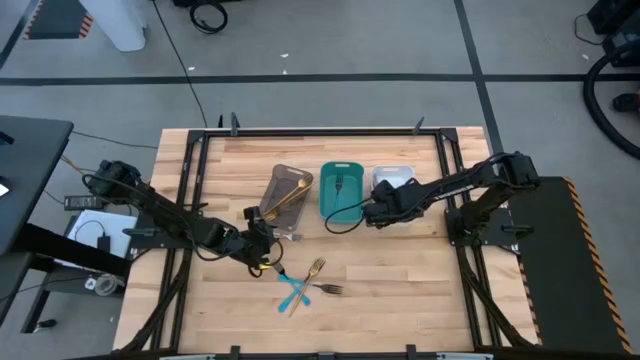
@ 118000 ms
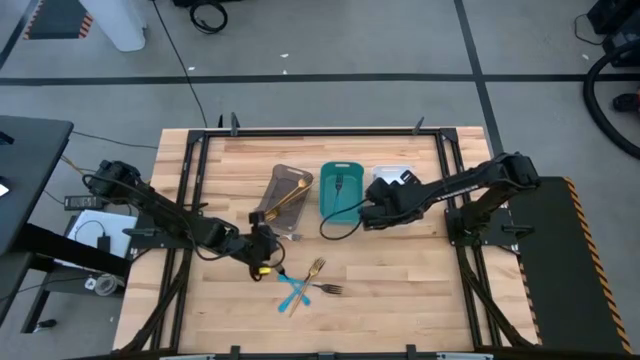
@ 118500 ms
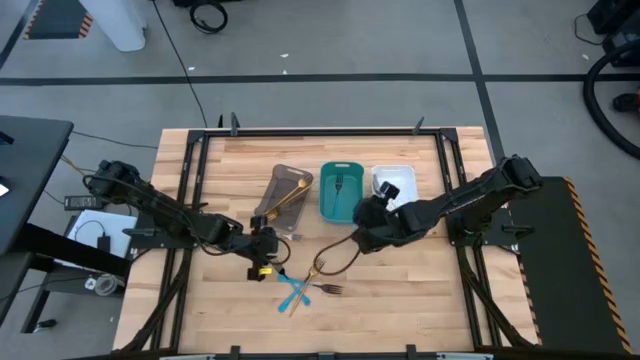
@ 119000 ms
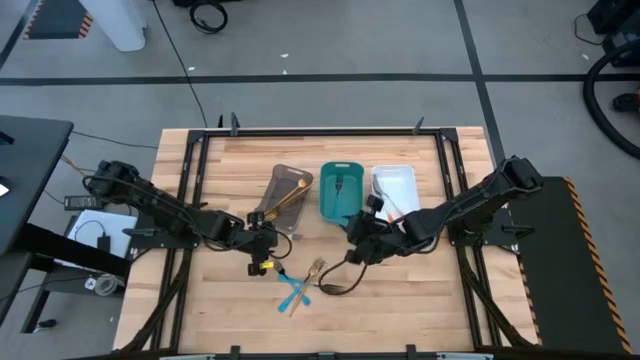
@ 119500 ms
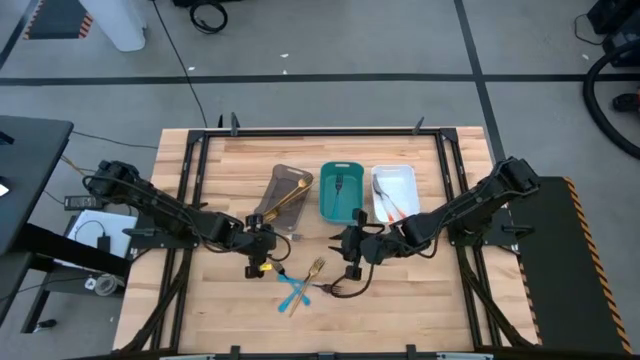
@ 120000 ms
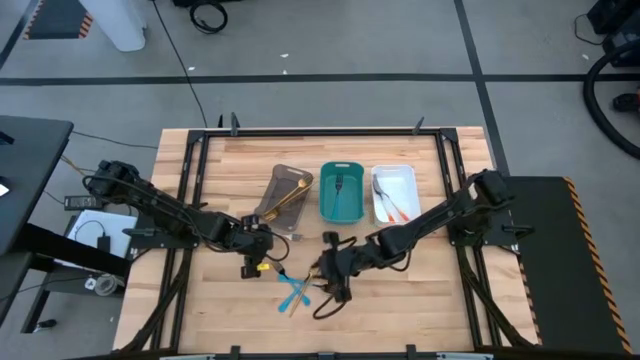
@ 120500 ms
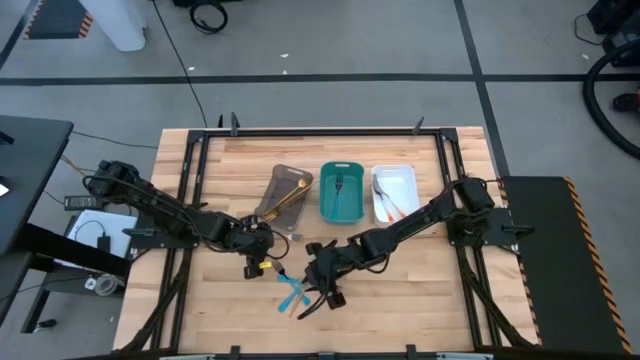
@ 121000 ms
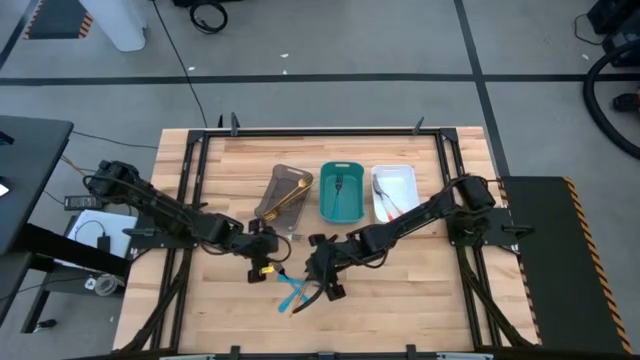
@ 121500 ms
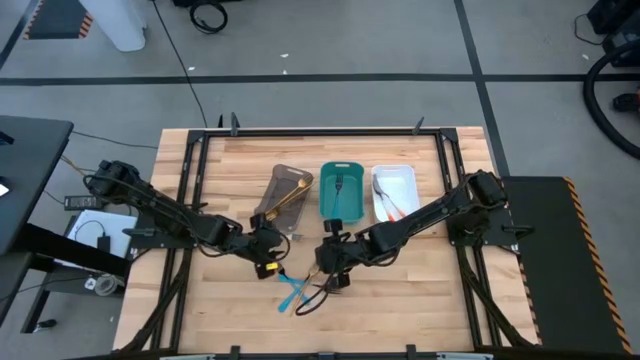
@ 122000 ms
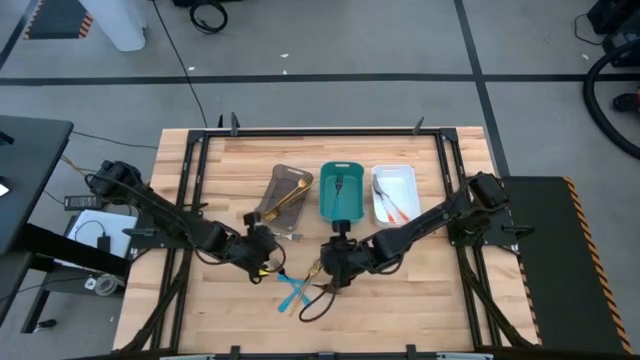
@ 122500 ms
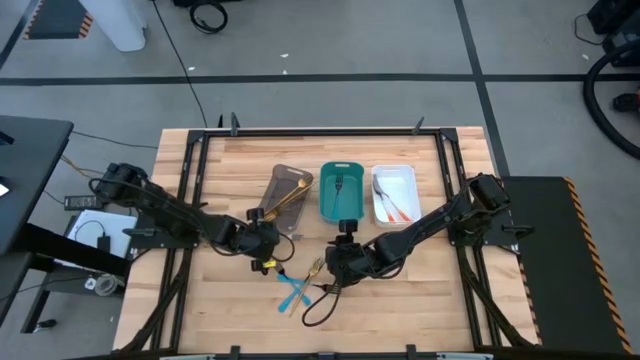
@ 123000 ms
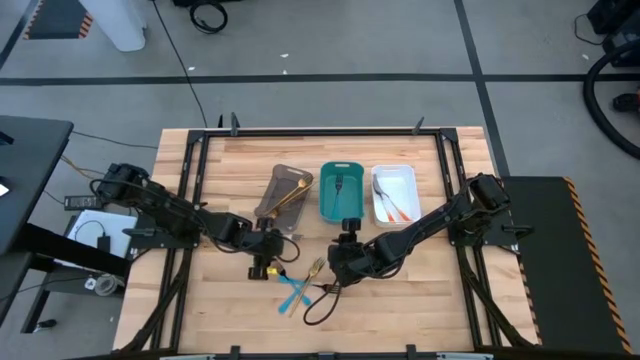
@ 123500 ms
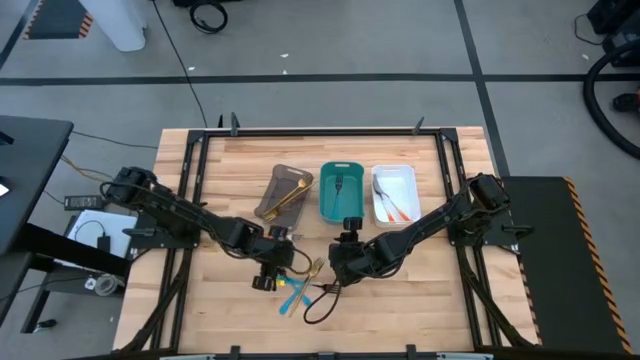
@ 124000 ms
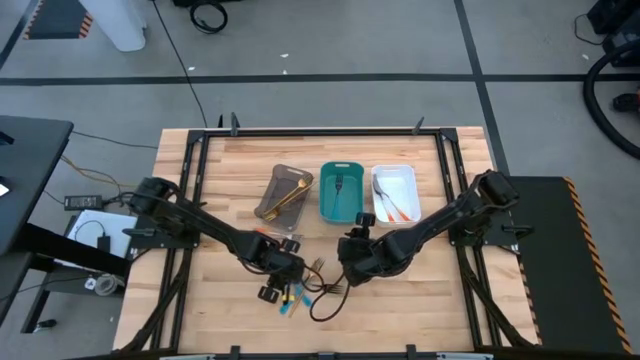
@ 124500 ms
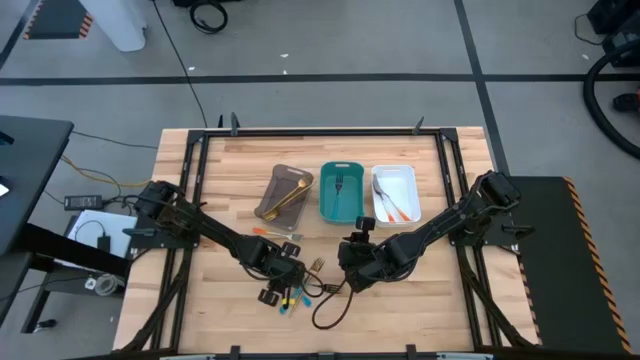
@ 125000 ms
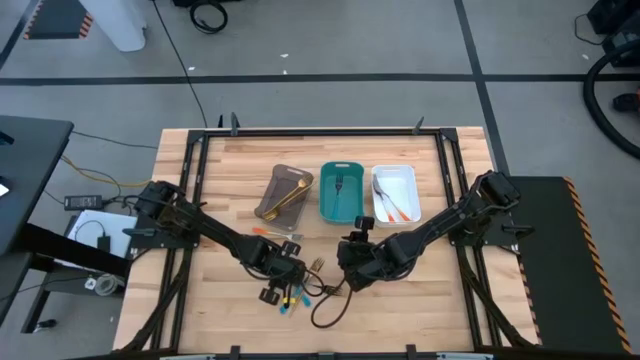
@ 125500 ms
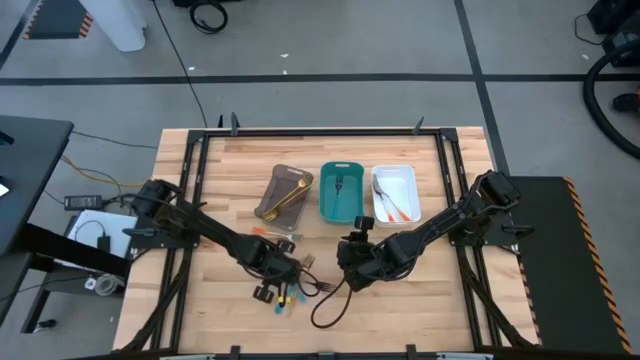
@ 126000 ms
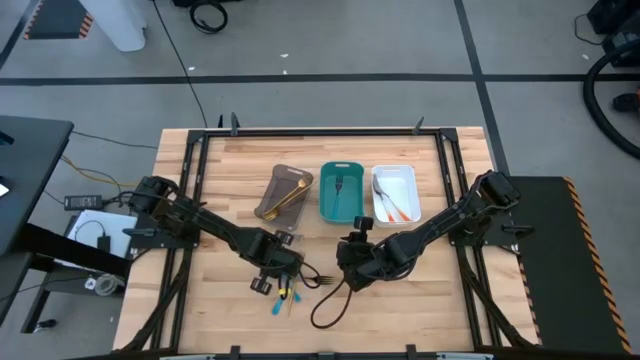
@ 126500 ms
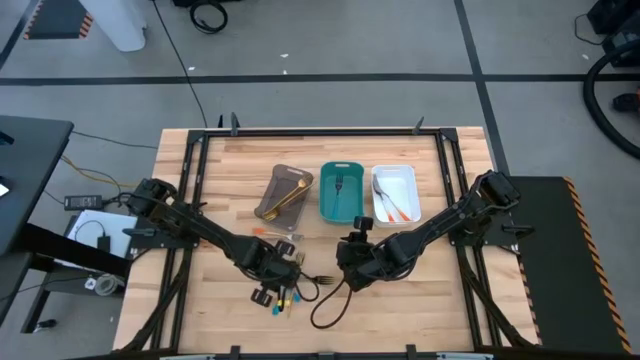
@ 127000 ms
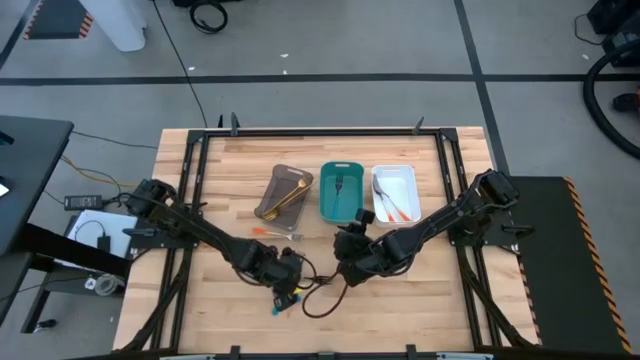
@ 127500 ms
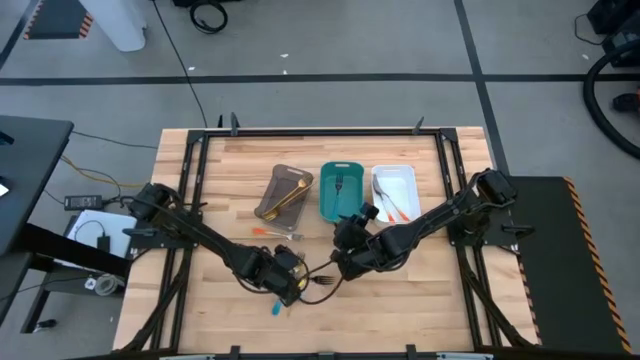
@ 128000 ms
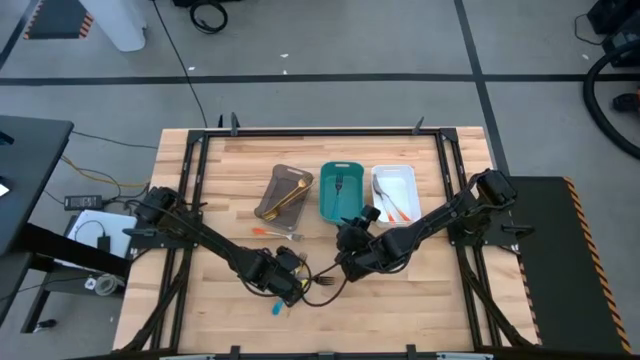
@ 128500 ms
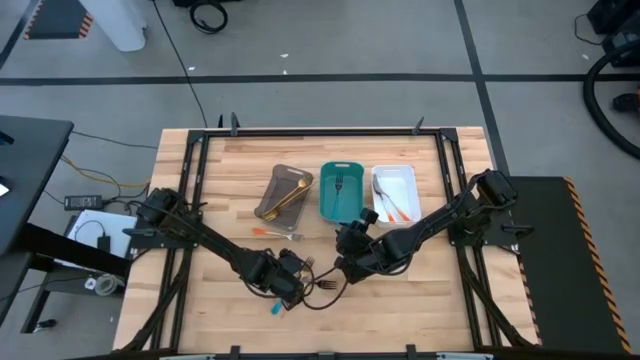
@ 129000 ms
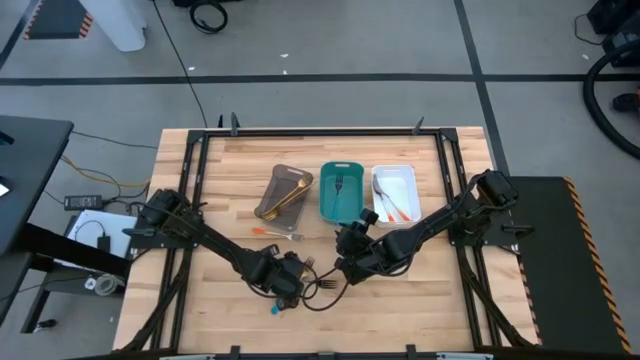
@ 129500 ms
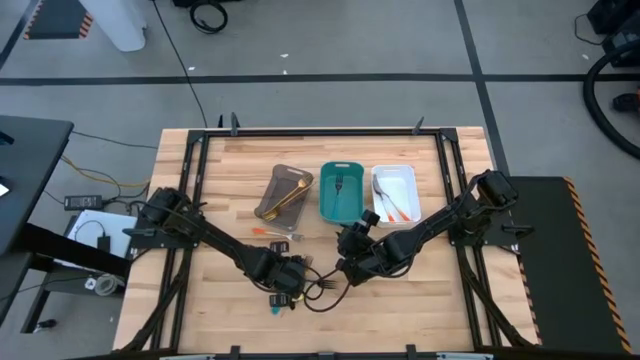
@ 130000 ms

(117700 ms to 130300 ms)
Task: Sort silverware by color (type)
Put the blue fork into the green bin

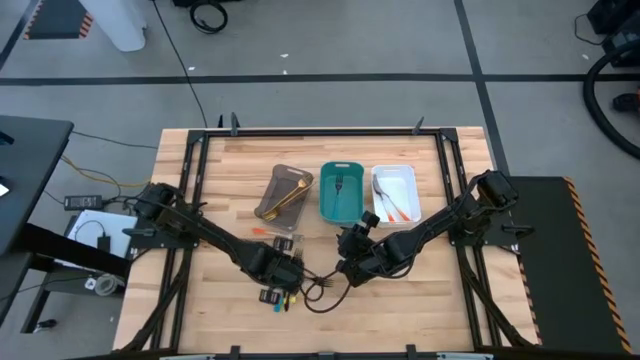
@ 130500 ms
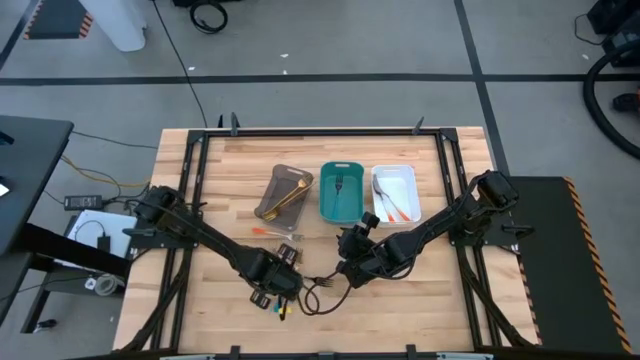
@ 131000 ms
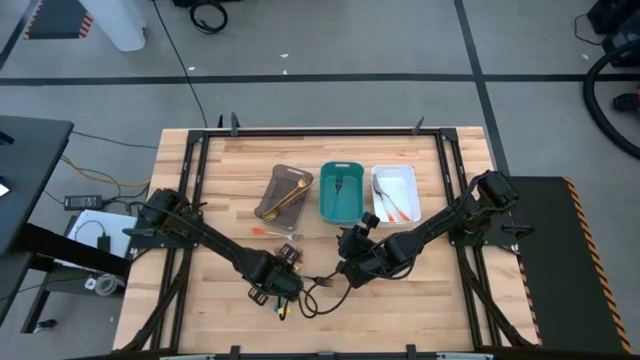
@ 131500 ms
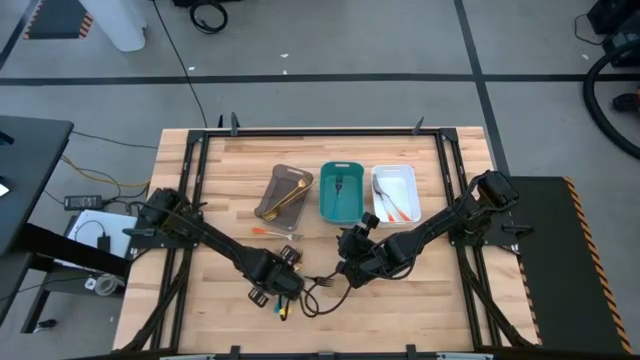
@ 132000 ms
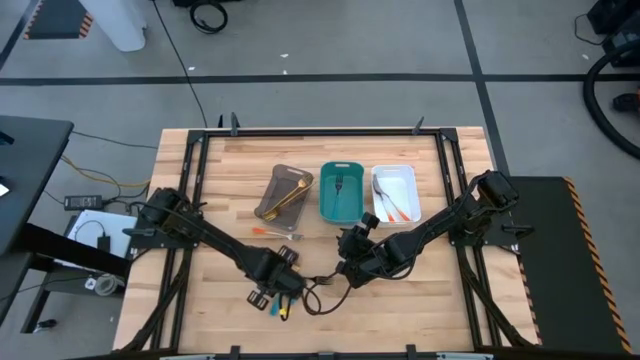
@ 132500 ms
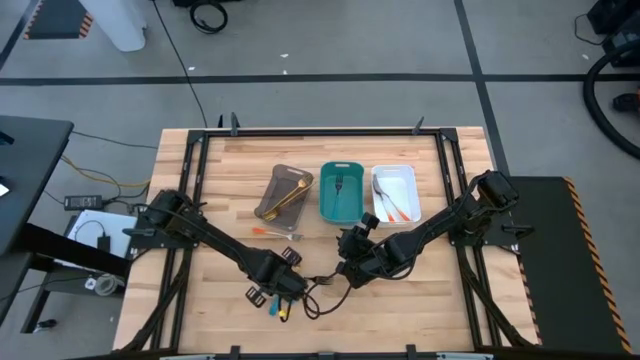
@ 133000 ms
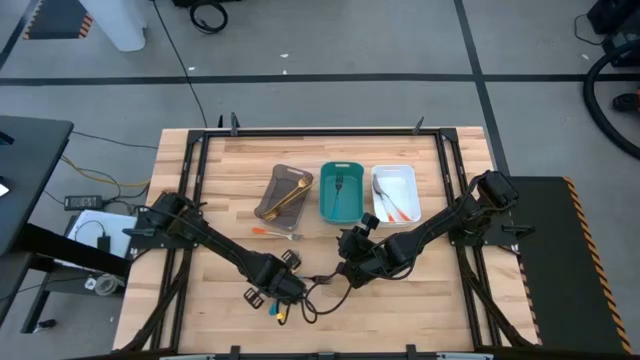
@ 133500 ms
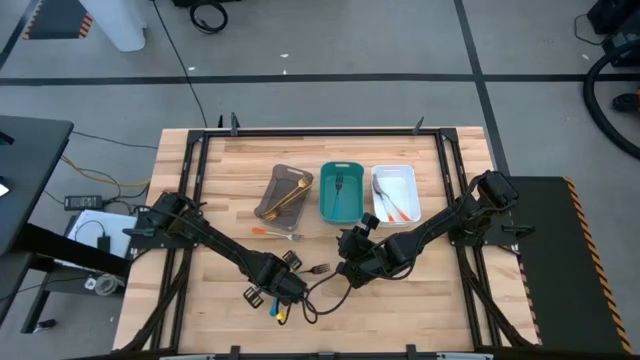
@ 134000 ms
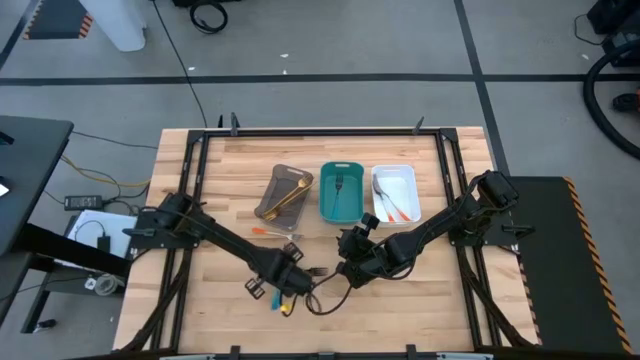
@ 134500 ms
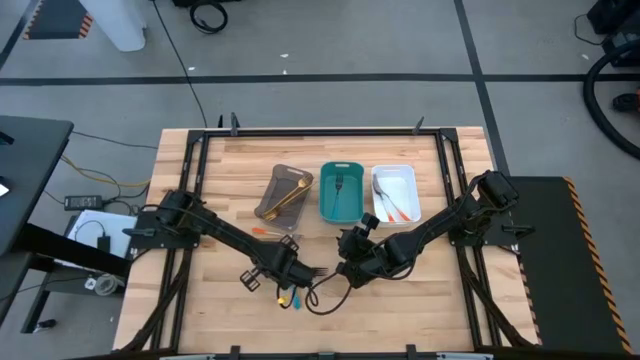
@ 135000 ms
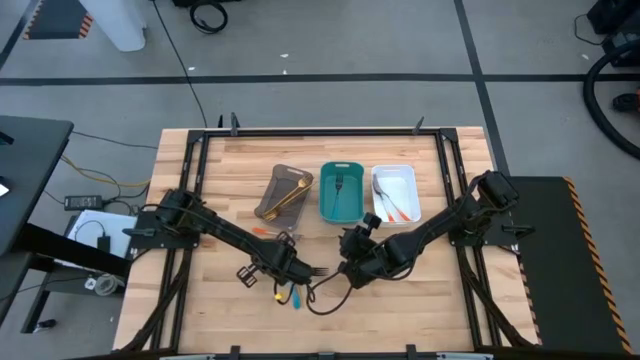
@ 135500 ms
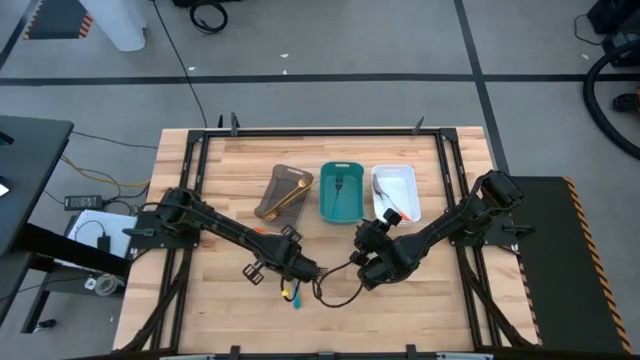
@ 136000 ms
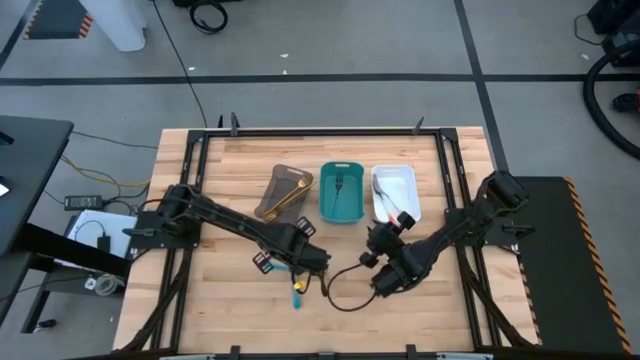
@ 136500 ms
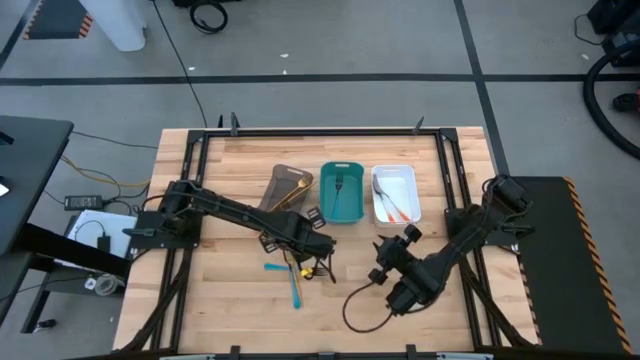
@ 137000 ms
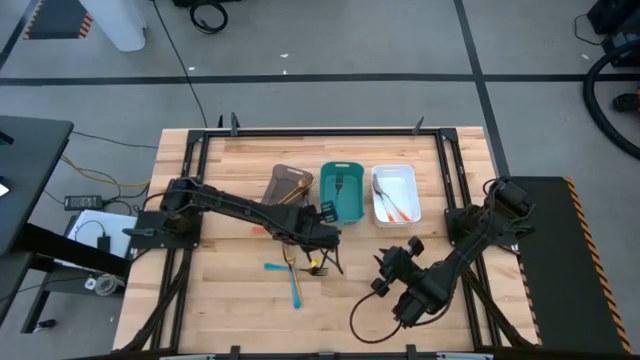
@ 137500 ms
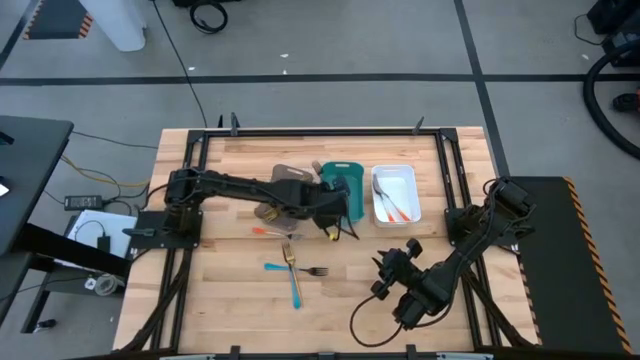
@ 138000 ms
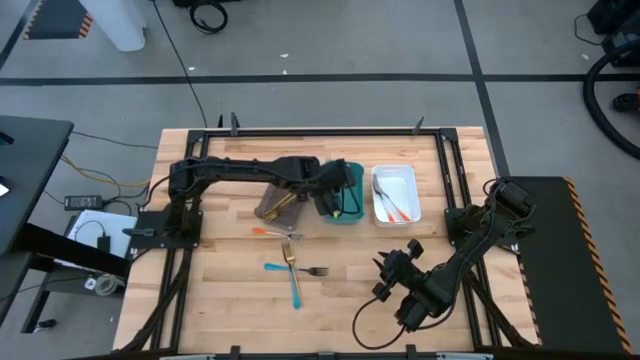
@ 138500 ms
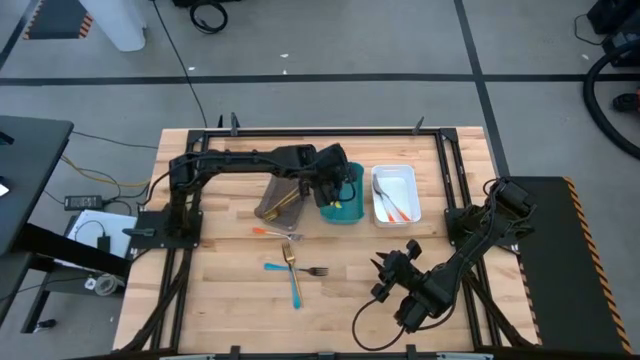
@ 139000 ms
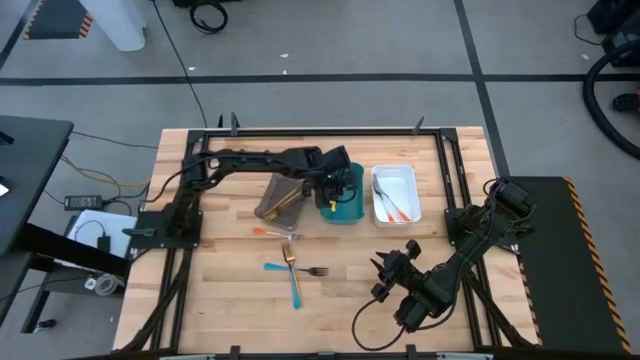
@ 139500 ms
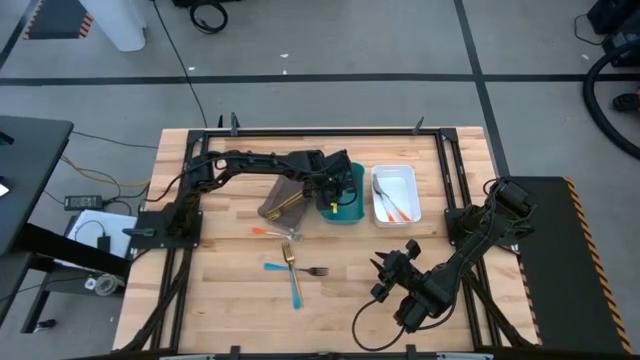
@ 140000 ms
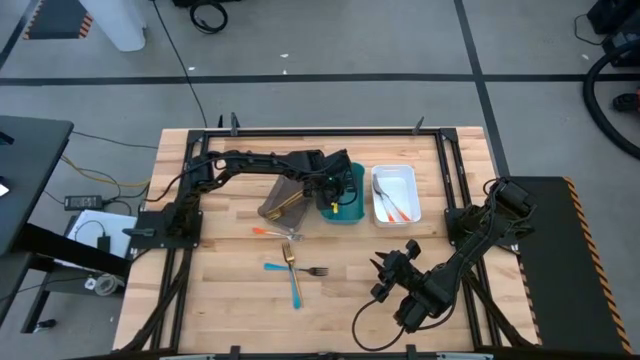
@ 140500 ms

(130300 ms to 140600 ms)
Put the blue fork into the green bin
